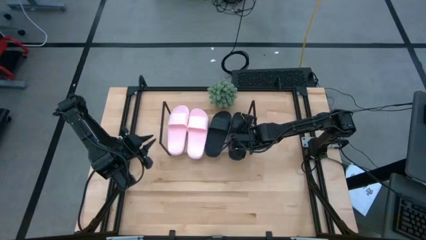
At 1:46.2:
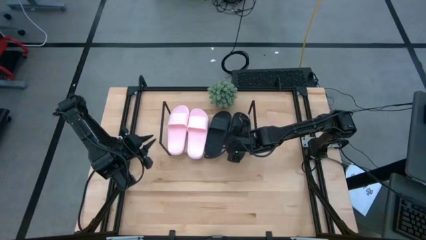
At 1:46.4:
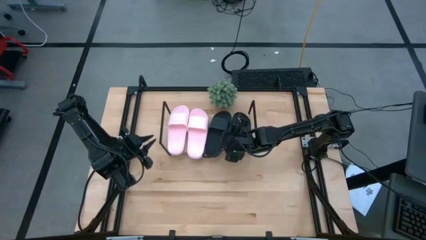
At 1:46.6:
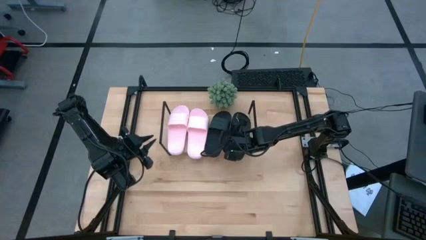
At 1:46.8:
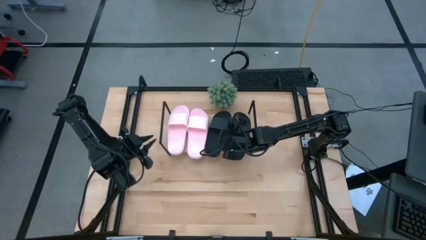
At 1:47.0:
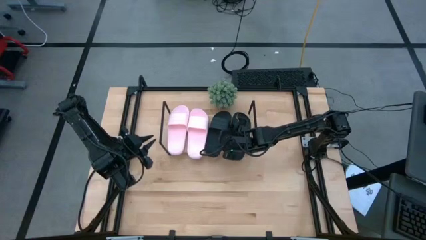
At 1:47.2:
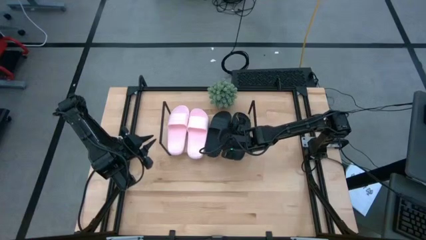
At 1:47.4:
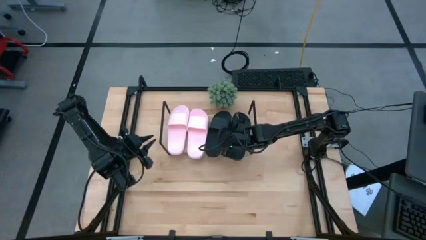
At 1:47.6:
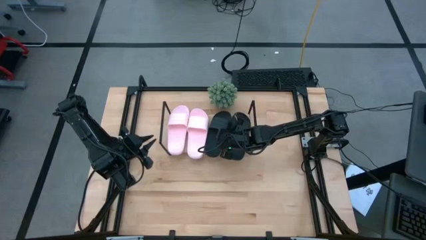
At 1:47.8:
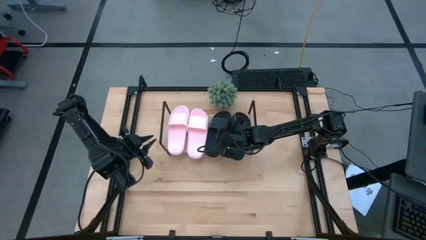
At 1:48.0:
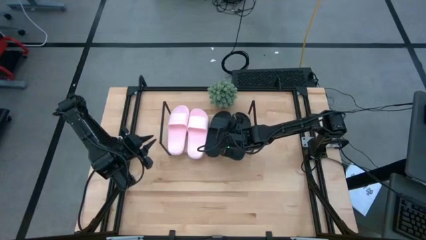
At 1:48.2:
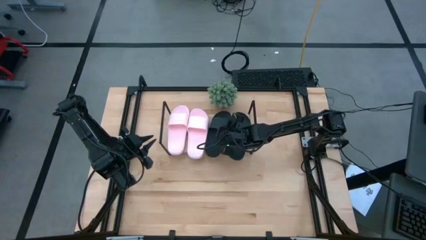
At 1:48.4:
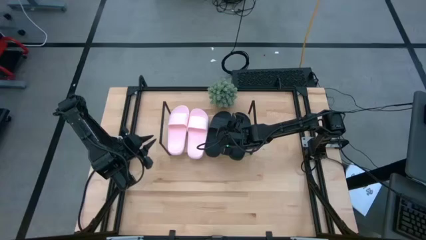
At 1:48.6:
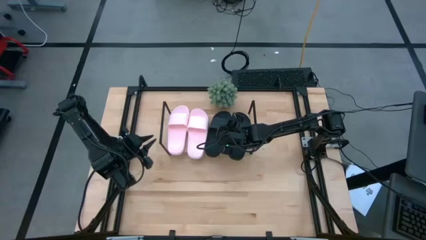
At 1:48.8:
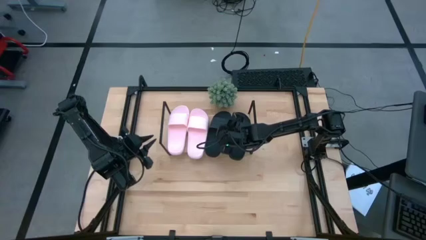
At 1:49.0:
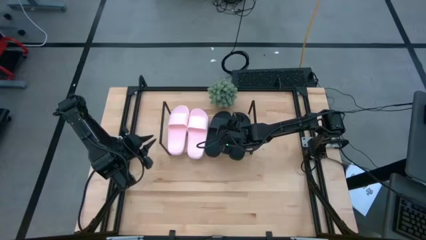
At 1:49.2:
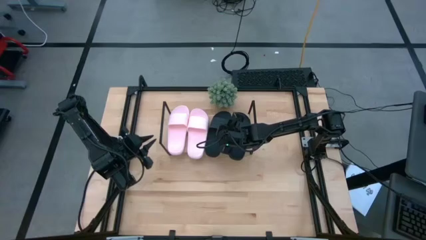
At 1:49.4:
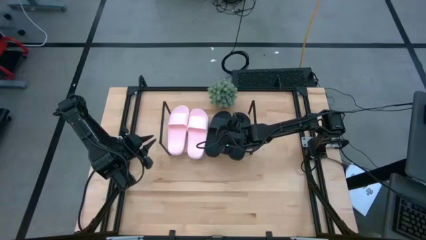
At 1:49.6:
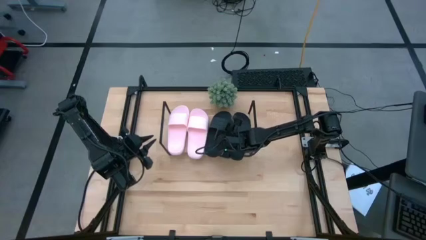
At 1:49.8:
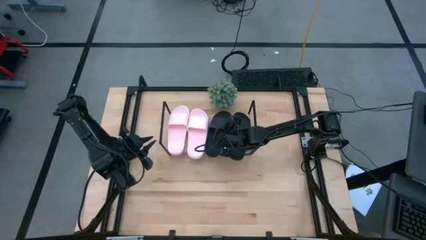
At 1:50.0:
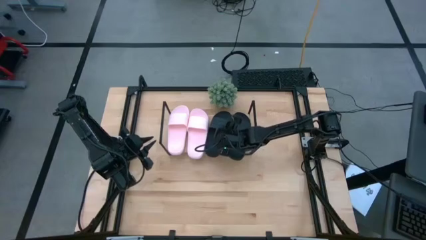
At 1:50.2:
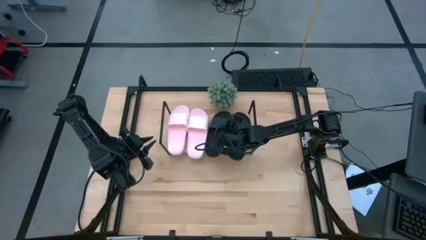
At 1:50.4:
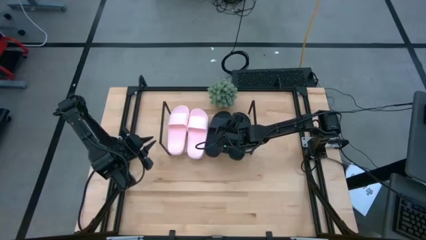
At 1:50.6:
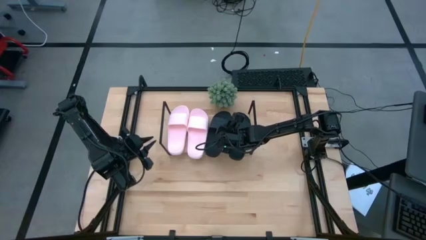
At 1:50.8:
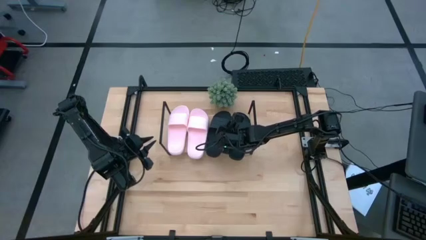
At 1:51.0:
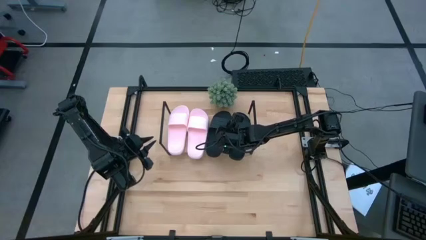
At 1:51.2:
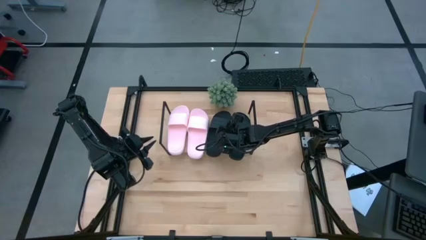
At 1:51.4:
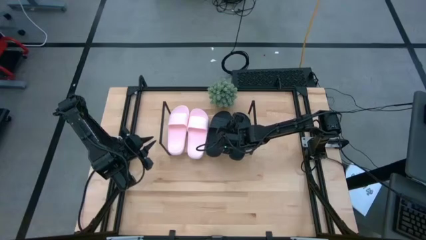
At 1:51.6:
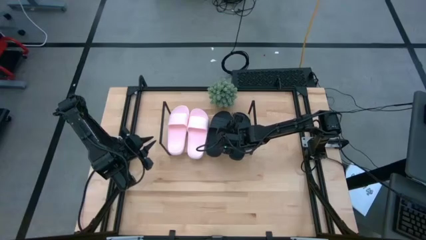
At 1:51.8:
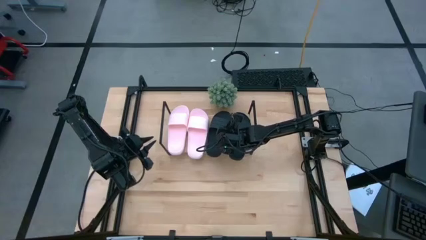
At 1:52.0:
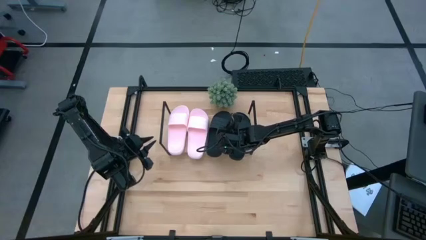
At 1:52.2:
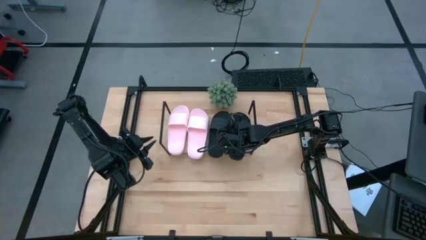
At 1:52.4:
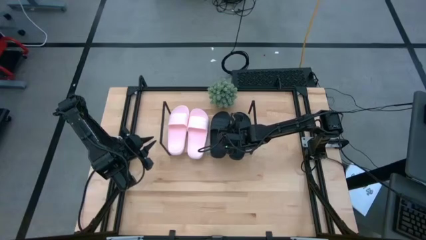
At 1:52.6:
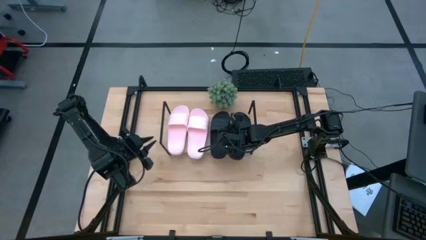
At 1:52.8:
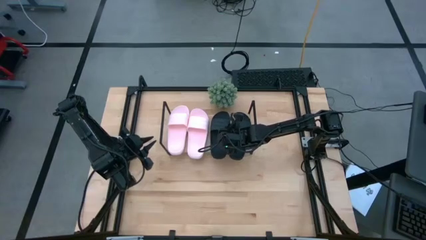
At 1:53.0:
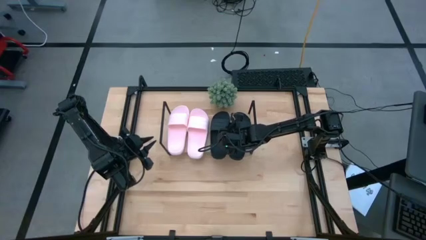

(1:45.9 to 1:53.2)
Task: Pick and place slides into the shelf
Adjust the black slide on the shelf

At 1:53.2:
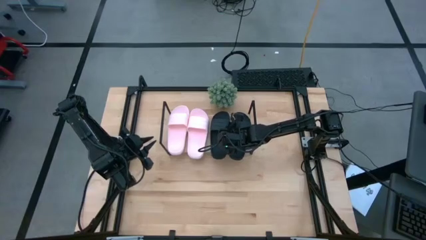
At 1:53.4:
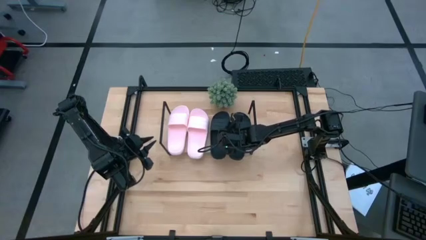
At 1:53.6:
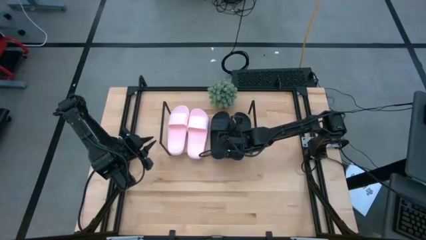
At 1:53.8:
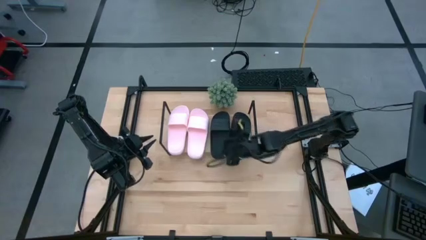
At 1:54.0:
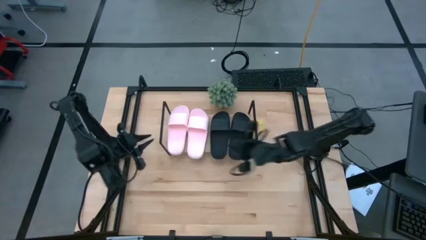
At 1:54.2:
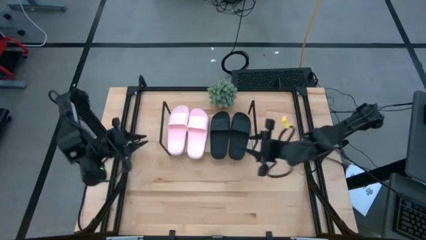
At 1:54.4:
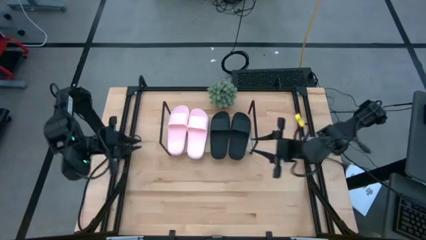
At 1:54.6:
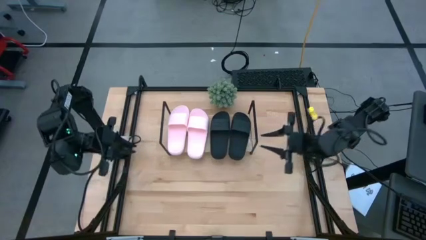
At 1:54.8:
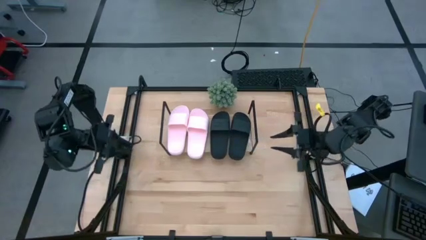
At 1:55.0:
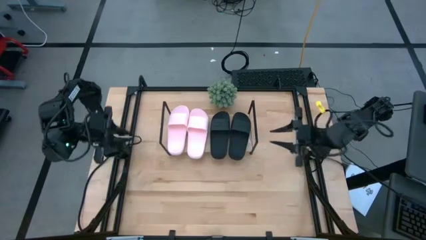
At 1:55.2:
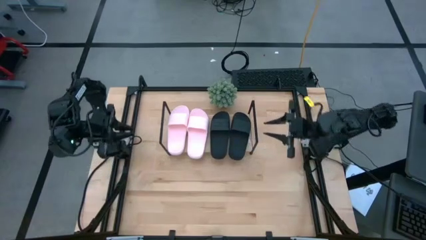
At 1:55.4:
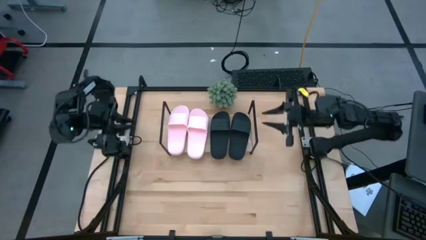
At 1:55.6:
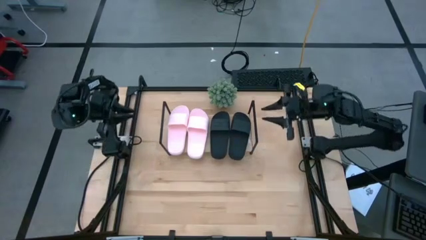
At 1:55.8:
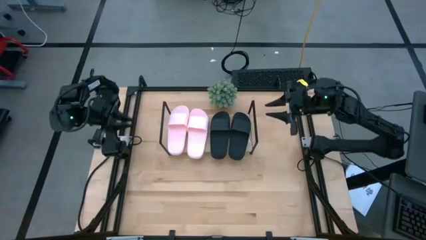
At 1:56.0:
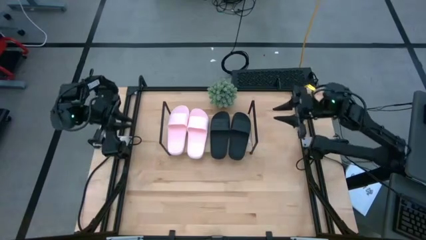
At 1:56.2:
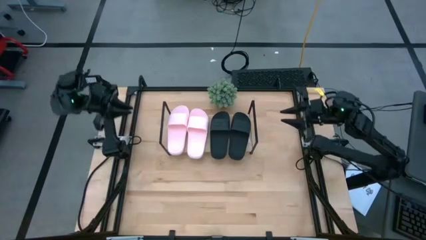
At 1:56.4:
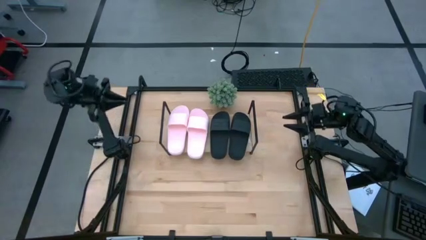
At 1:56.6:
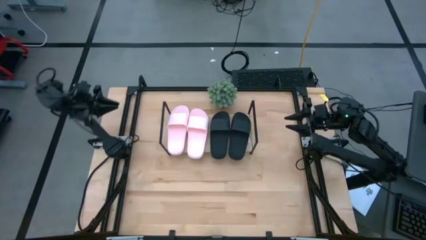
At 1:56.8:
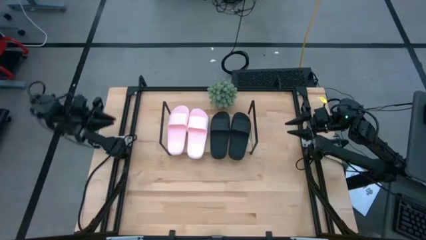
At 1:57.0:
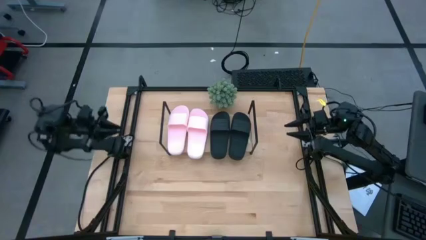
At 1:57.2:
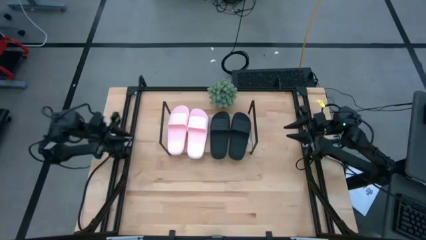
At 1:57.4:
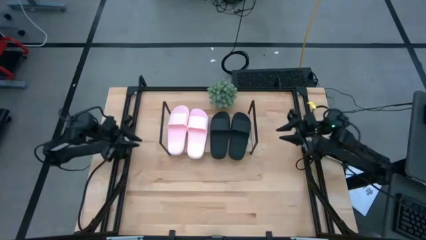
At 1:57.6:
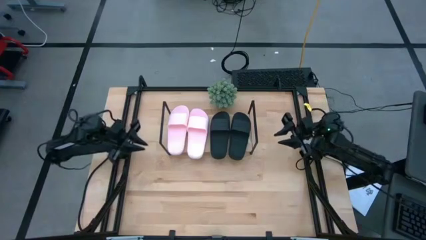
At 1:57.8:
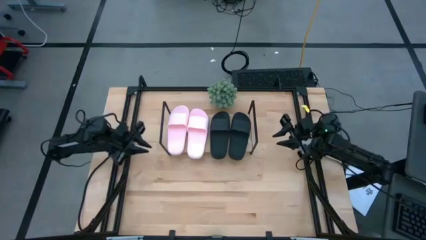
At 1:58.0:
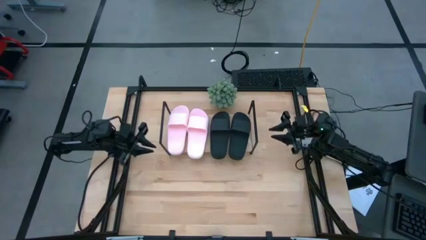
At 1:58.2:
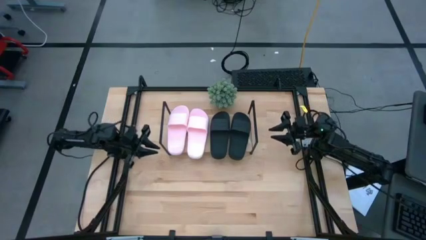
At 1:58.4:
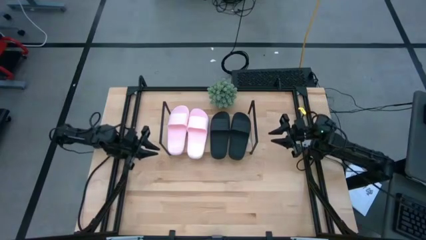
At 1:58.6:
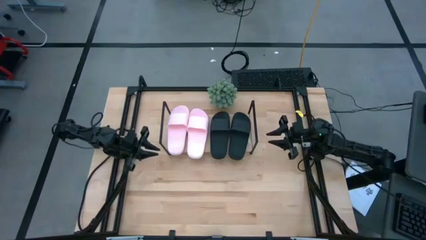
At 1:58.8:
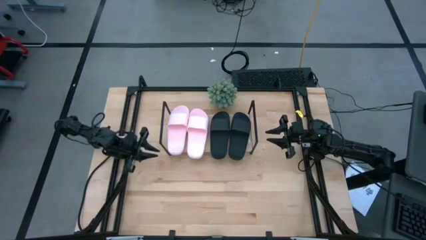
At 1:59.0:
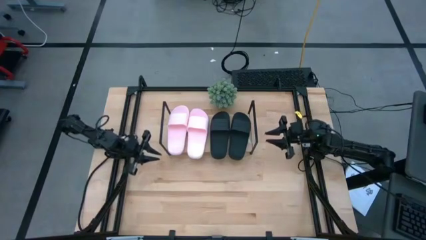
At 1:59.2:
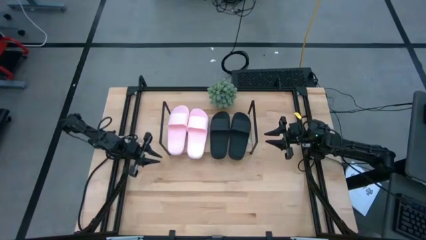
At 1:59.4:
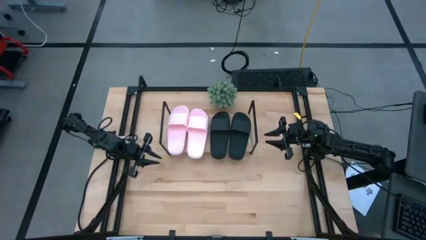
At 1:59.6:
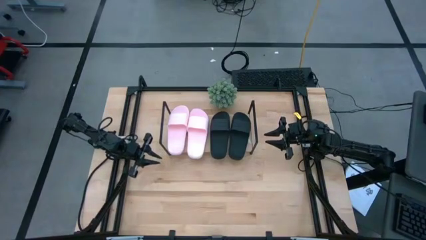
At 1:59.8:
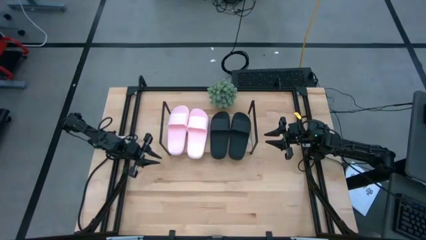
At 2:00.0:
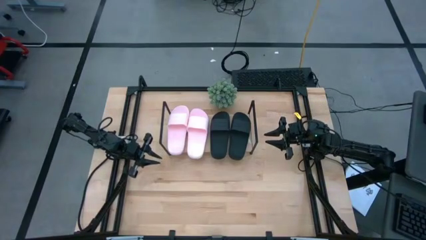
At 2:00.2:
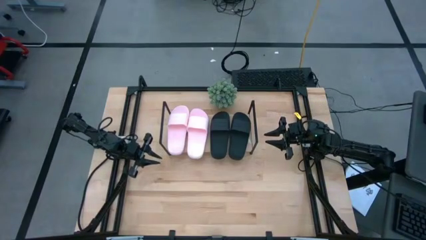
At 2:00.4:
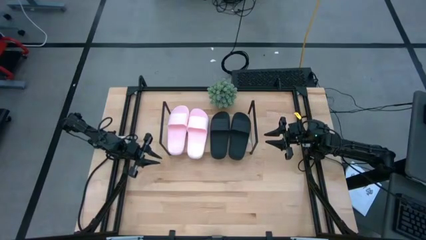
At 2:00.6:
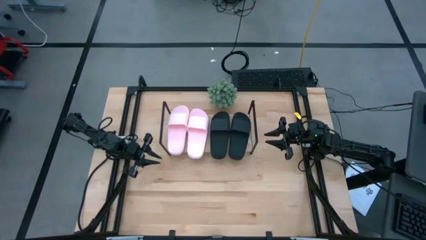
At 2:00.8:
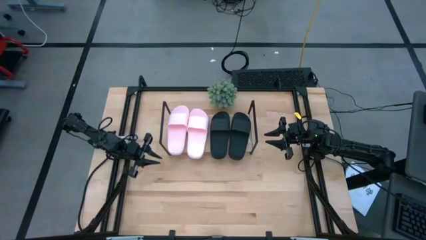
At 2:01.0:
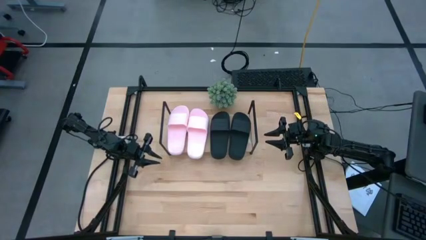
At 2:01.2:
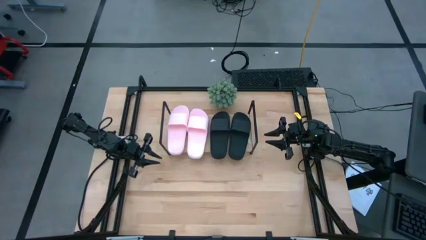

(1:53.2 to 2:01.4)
Return to Home Position
